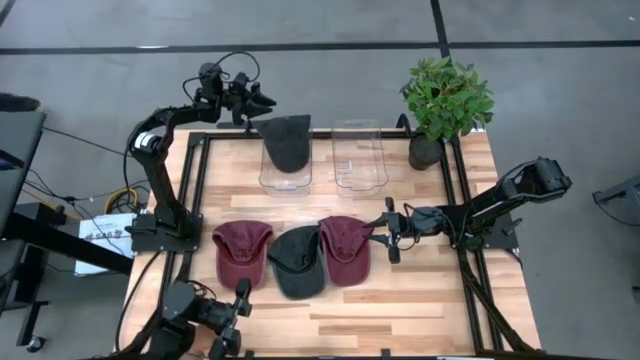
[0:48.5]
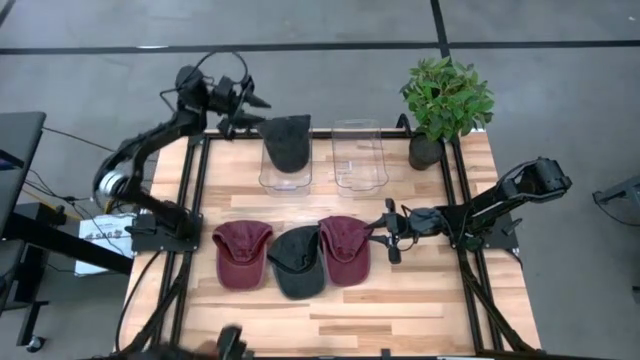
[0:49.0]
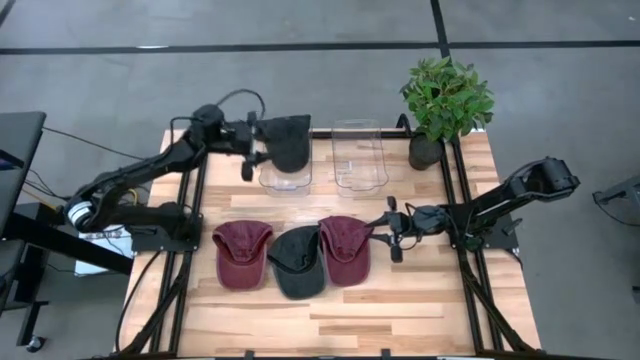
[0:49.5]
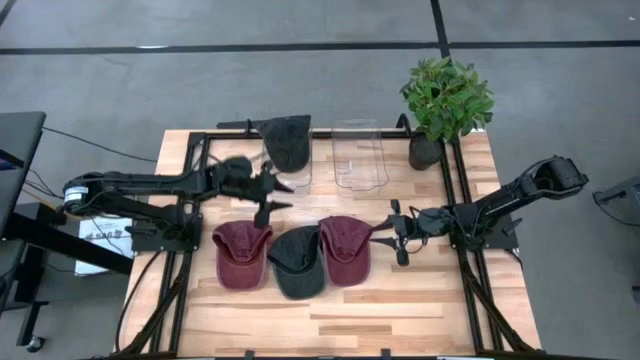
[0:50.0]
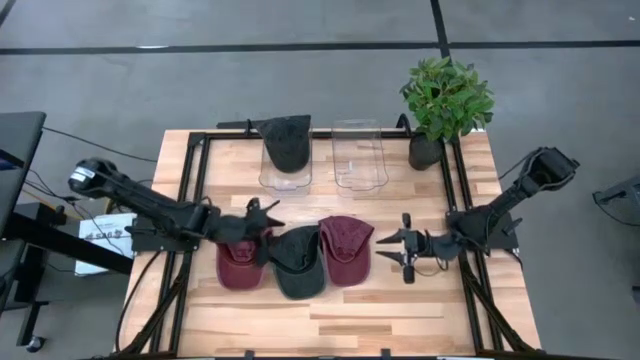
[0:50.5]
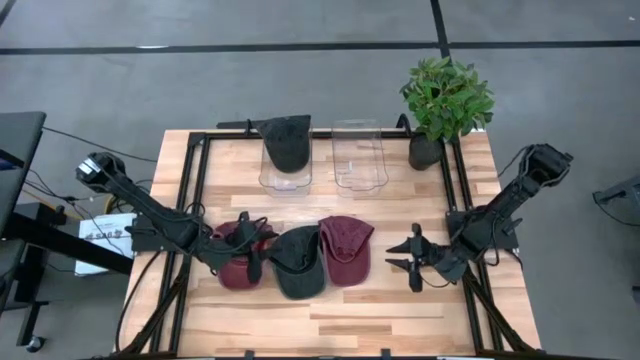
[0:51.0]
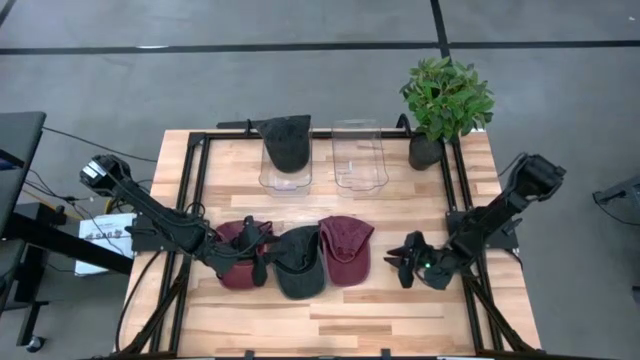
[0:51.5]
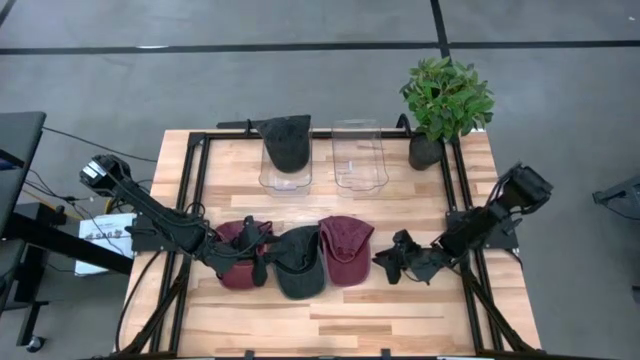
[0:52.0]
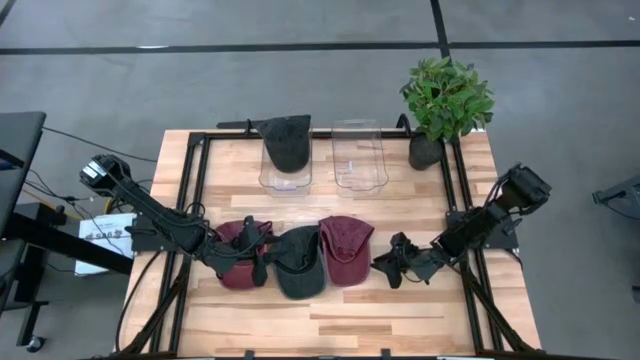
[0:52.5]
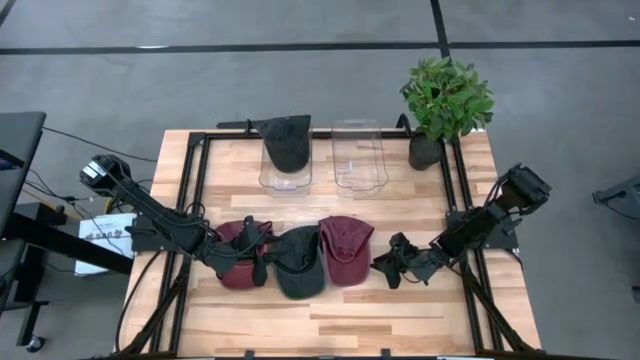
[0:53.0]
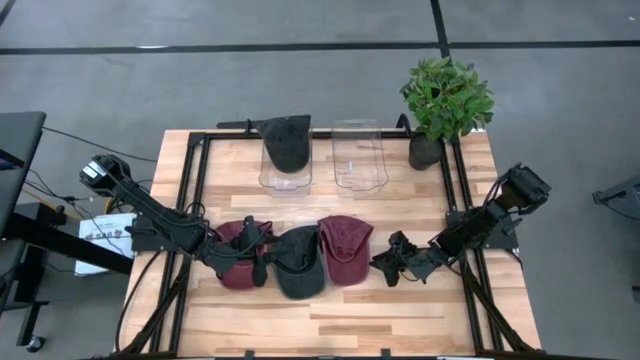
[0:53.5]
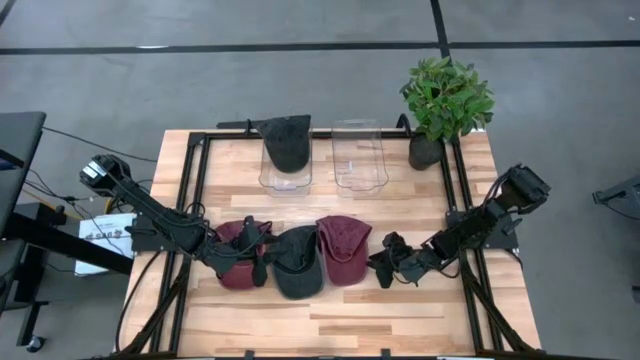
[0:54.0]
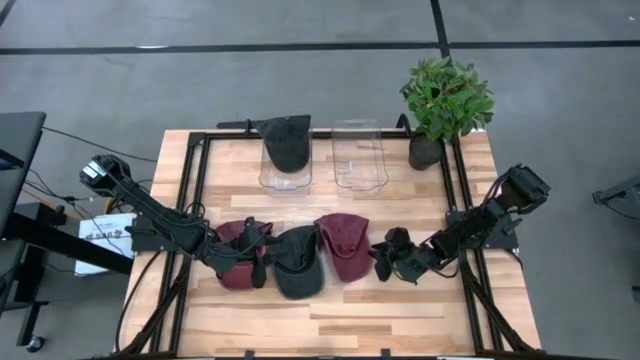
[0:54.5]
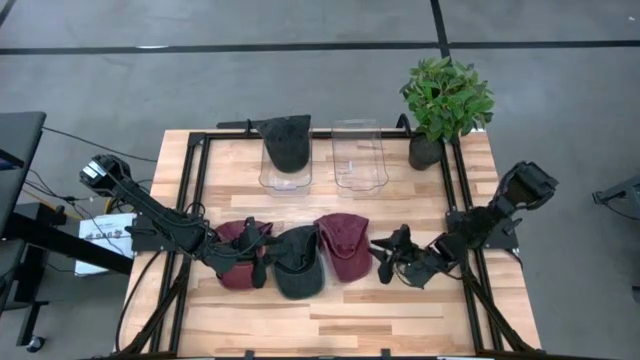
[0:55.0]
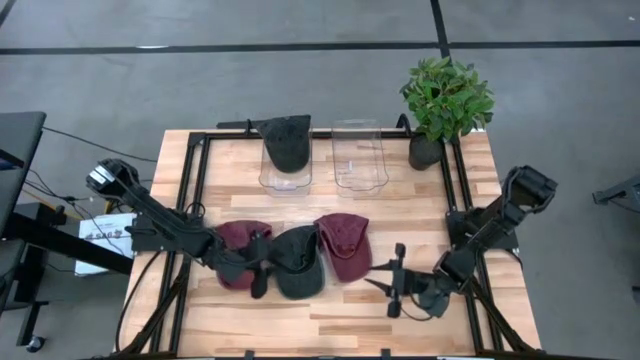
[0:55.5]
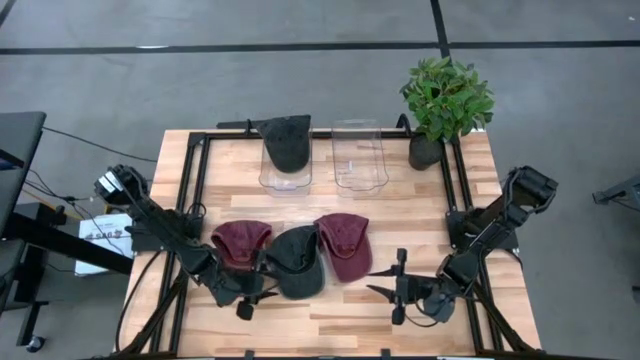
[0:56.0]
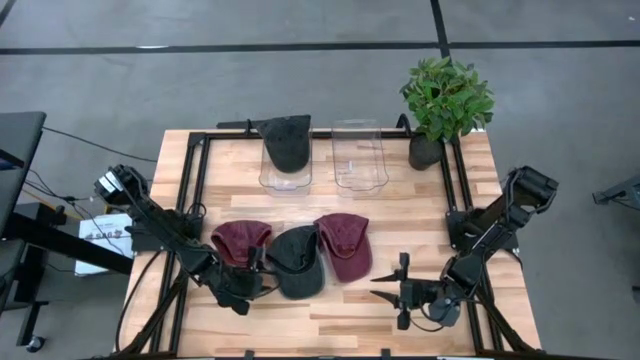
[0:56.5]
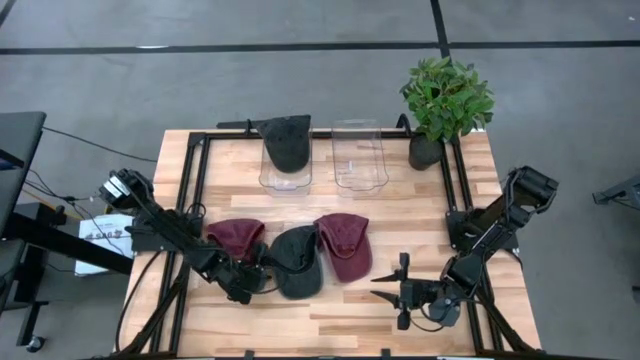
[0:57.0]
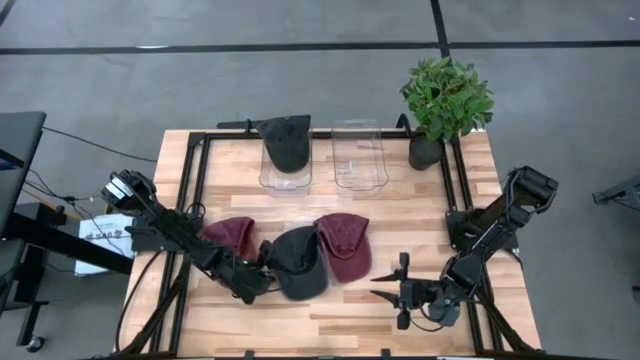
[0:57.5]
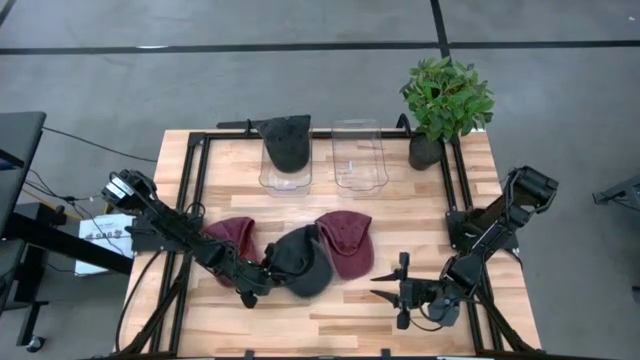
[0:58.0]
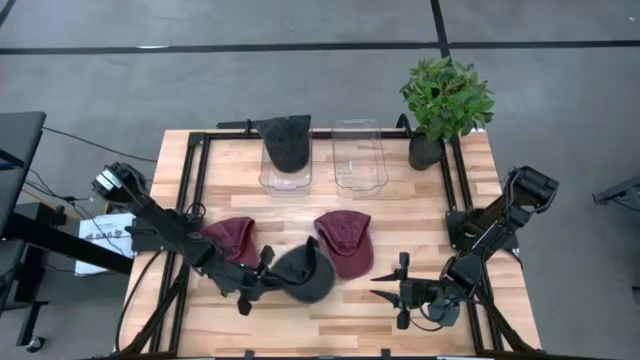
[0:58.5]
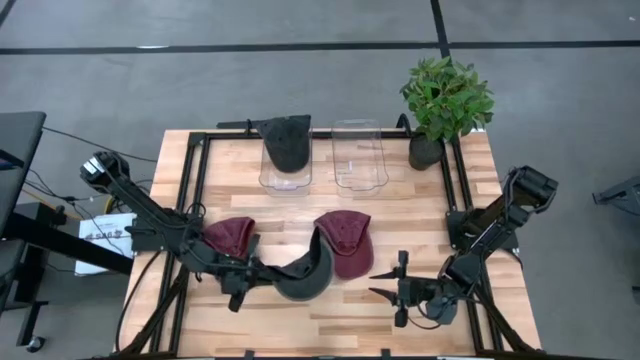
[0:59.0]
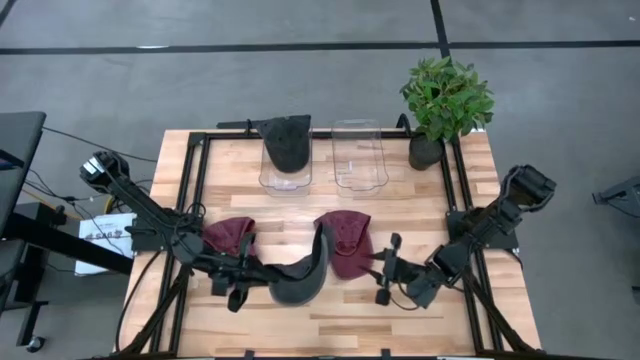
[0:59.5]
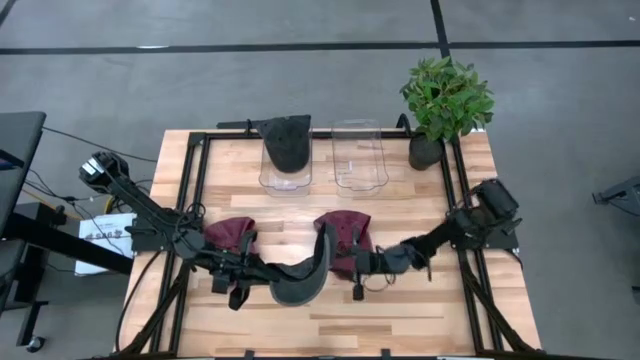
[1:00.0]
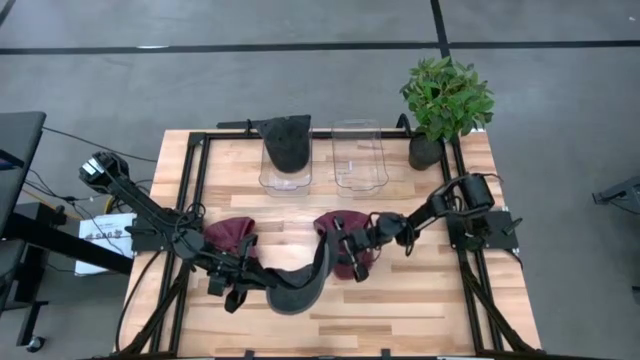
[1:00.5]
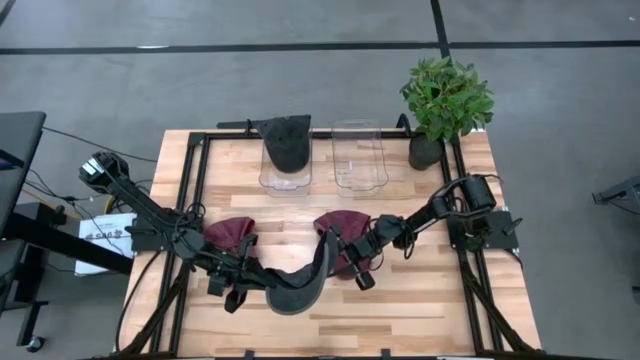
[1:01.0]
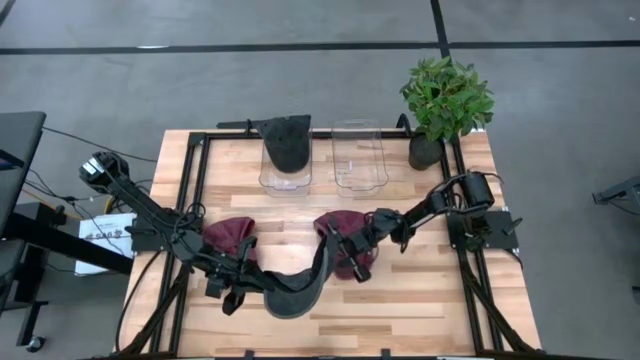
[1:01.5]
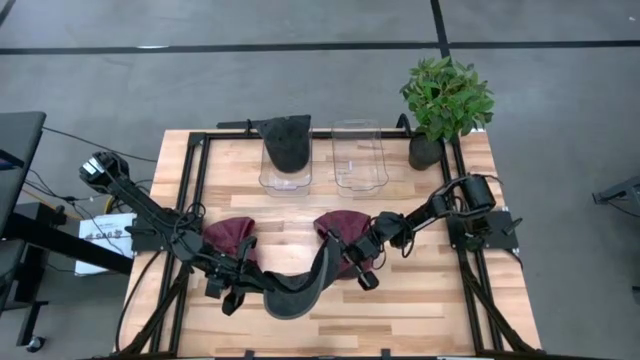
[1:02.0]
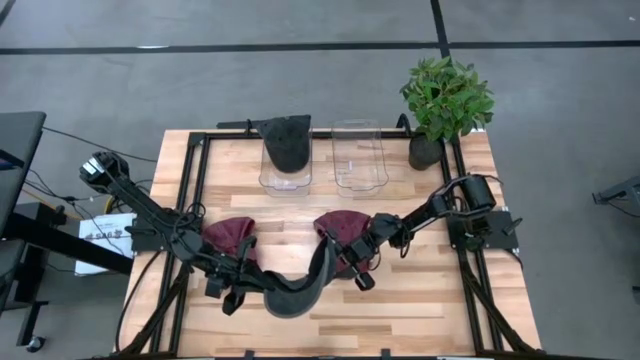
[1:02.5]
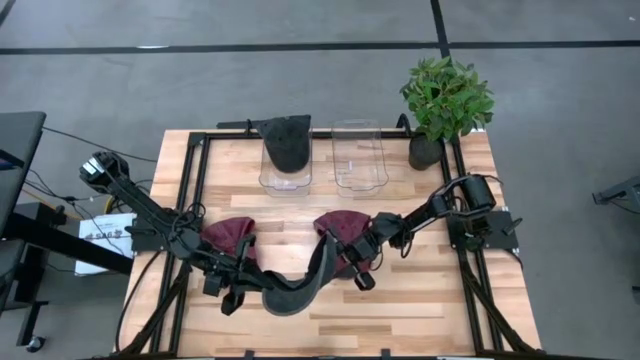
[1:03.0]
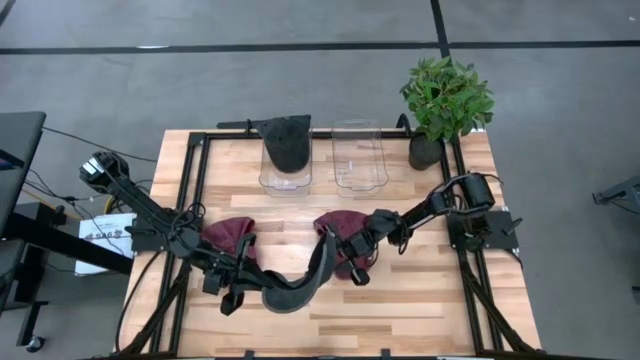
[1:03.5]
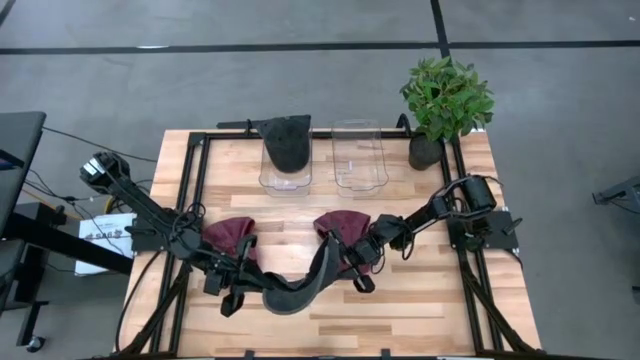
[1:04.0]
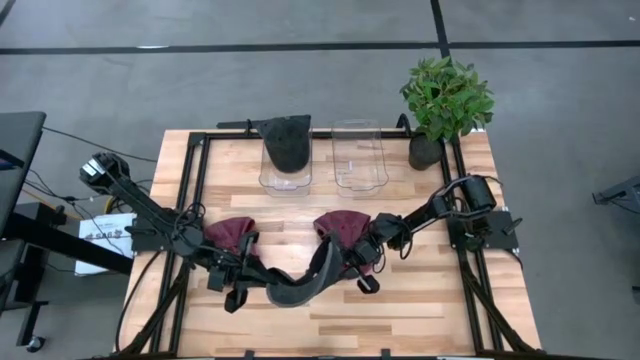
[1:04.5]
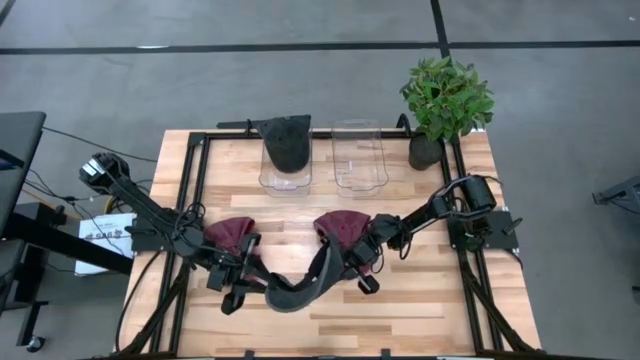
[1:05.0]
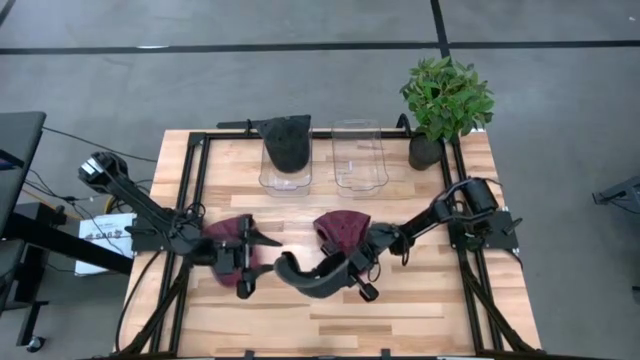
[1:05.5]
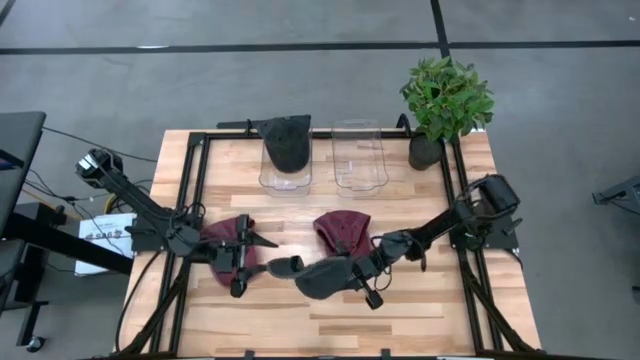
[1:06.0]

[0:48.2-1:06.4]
Task: Pick & Place hat
Put the black cap into the left transparent bin

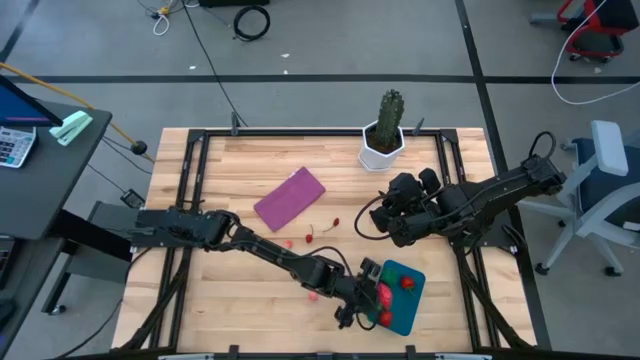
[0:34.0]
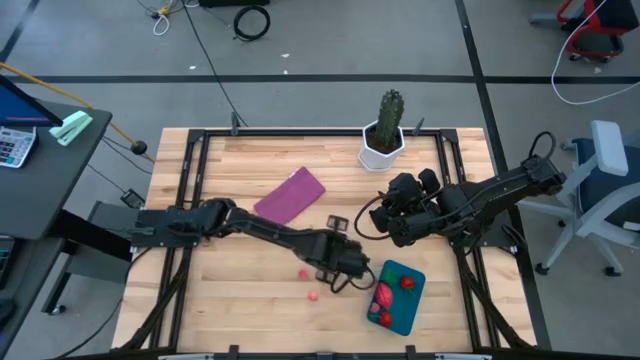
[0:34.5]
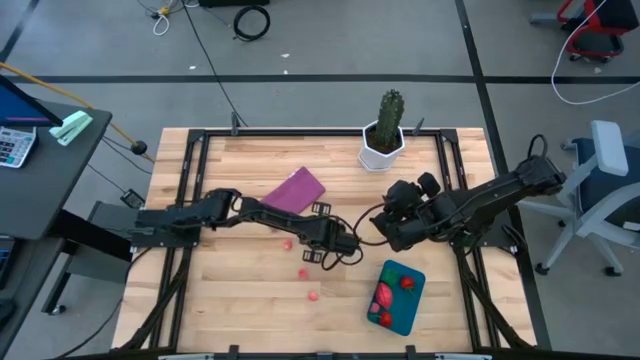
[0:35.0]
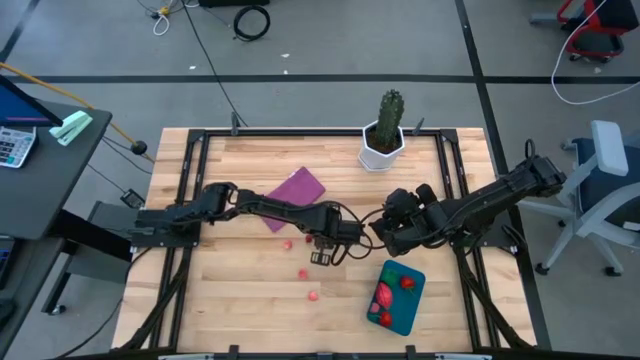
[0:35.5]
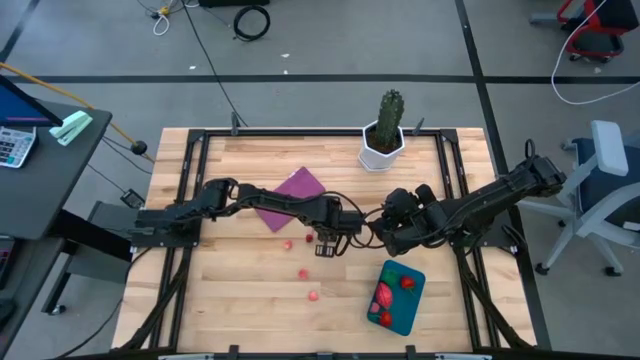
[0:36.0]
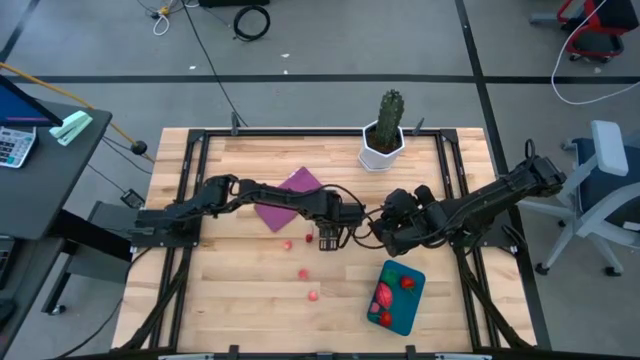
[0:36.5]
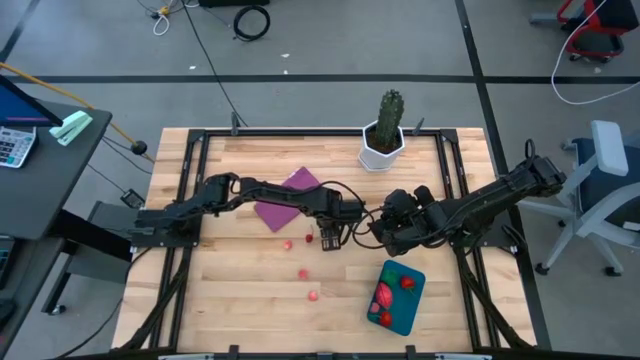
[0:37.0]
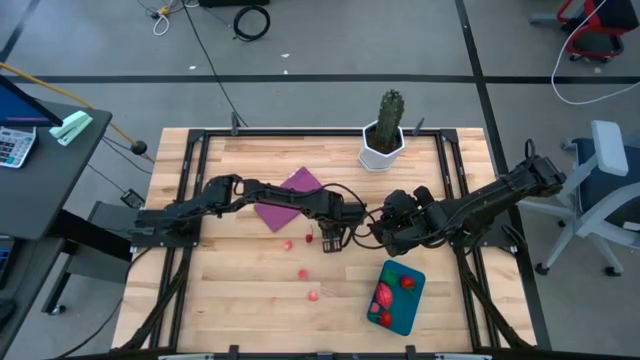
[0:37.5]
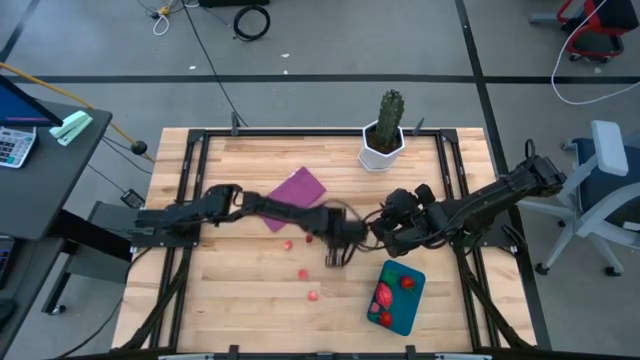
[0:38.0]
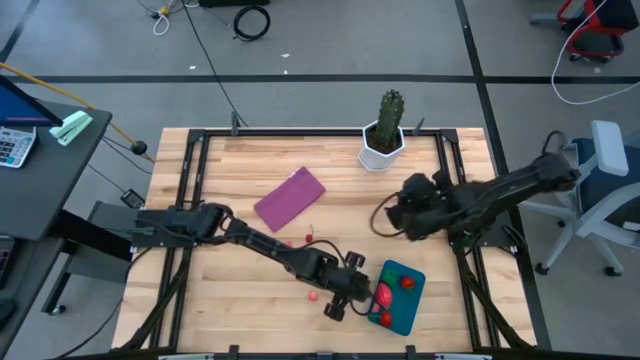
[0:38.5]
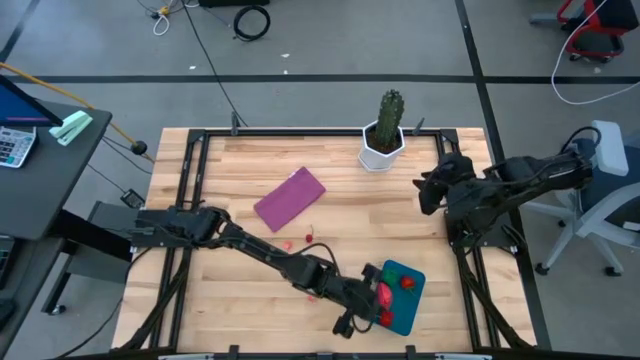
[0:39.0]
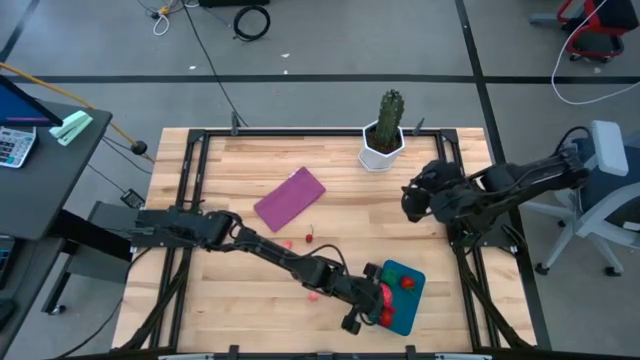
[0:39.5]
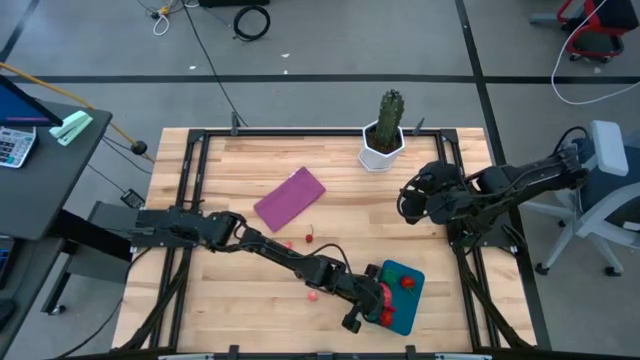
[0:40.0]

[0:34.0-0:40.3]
Task: Pick and placing Produce into tupperware
Put the cherry into the blue bin
